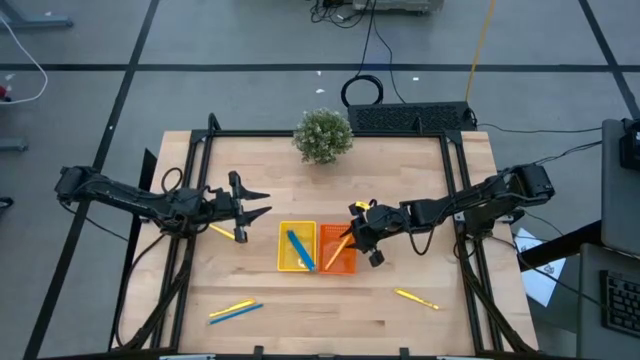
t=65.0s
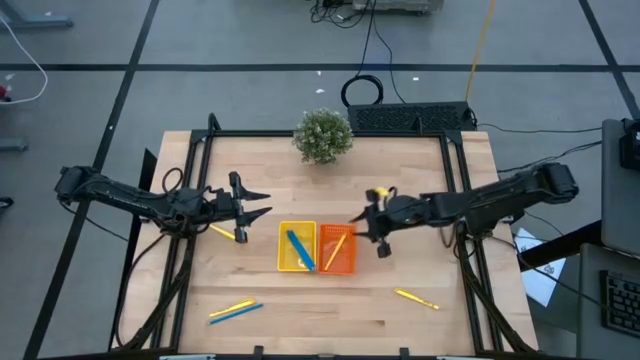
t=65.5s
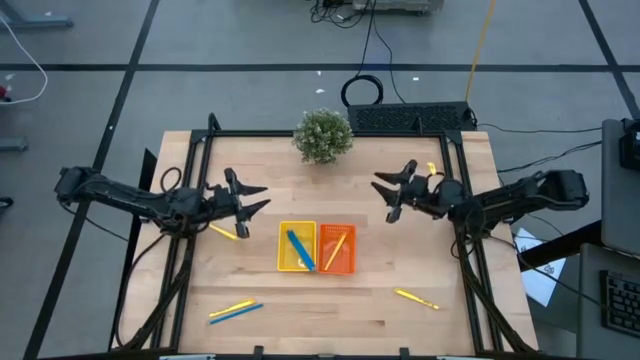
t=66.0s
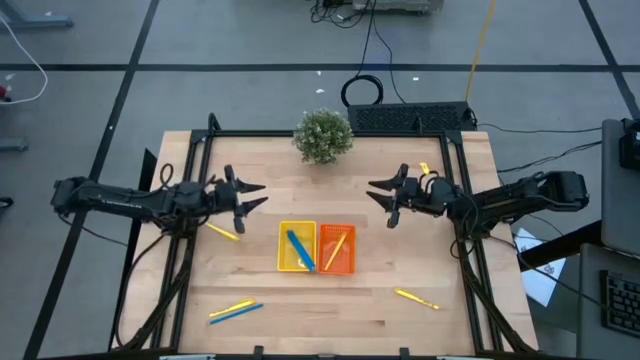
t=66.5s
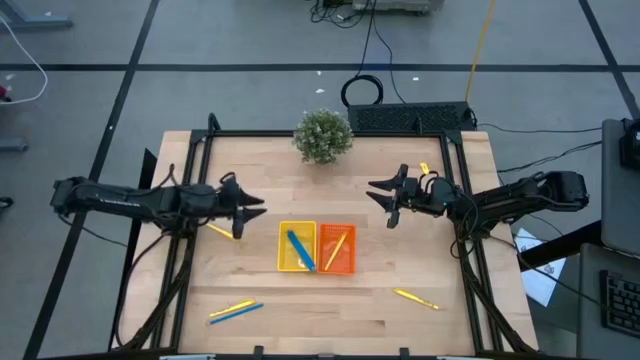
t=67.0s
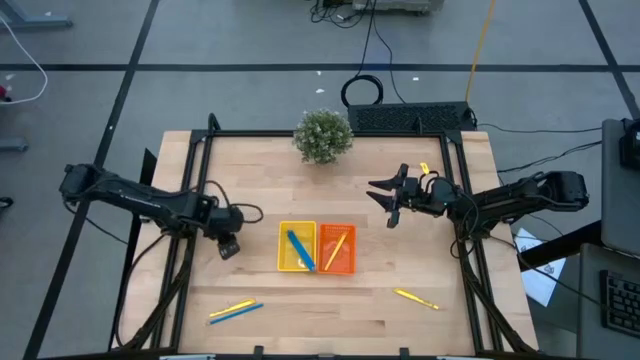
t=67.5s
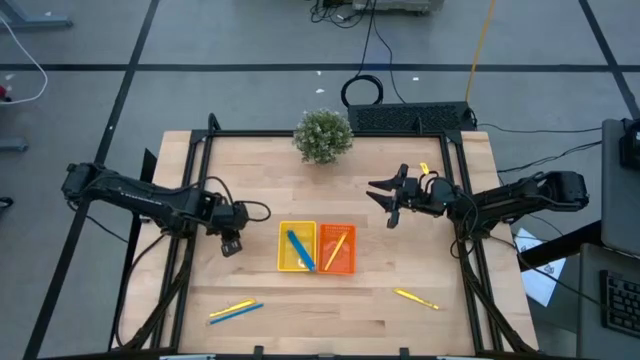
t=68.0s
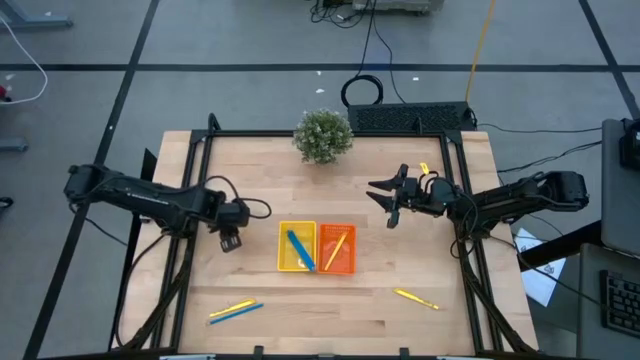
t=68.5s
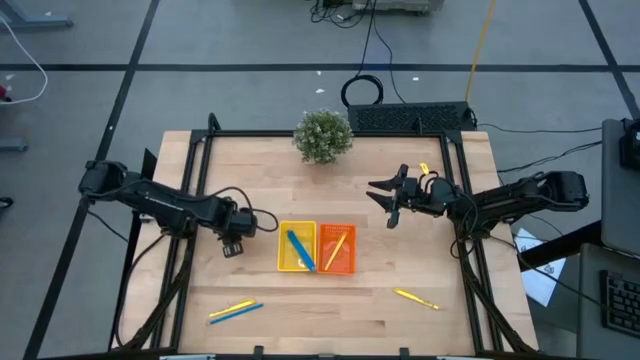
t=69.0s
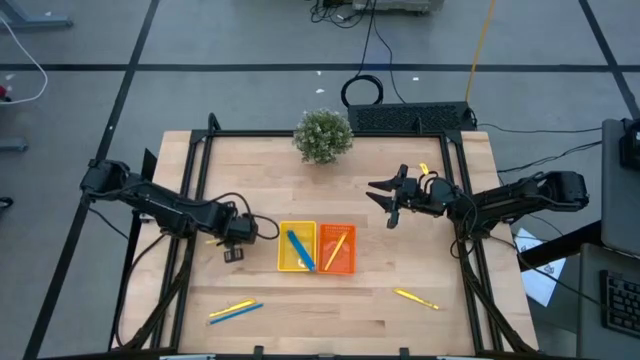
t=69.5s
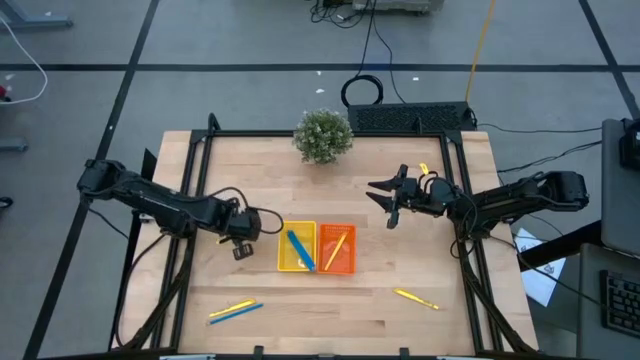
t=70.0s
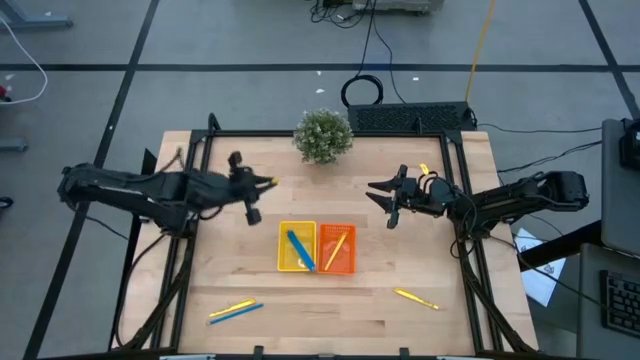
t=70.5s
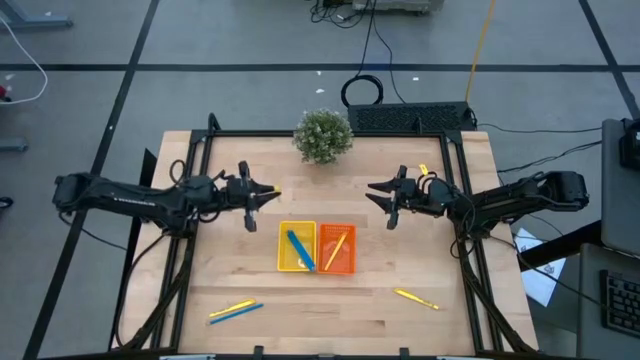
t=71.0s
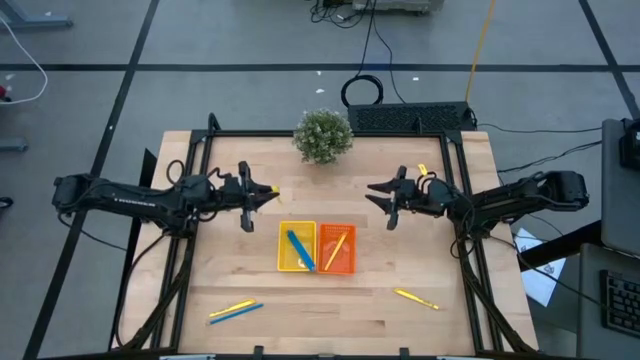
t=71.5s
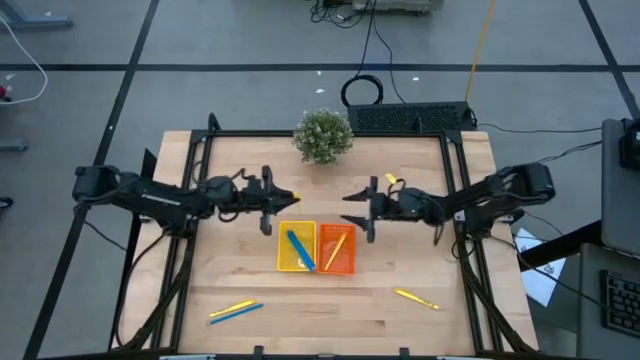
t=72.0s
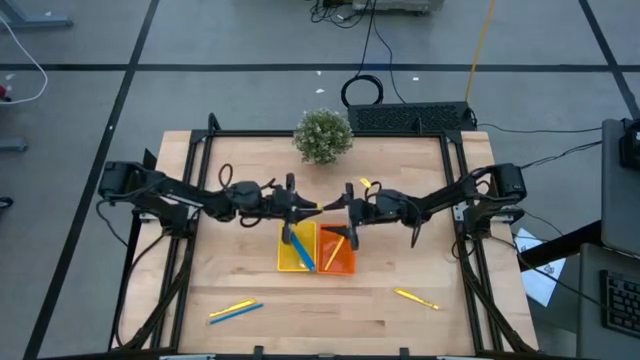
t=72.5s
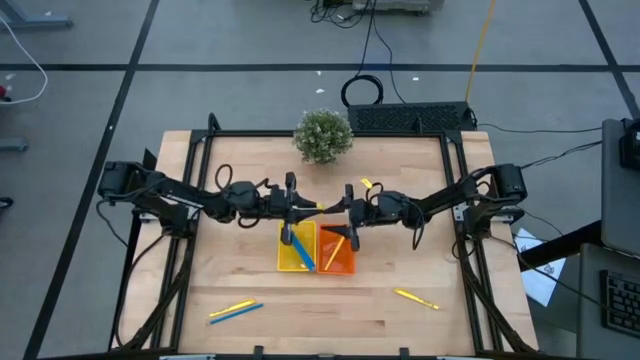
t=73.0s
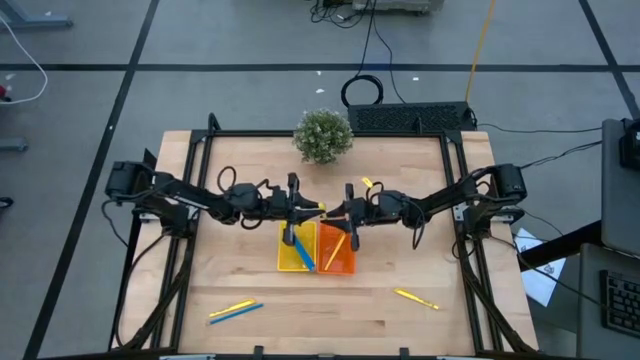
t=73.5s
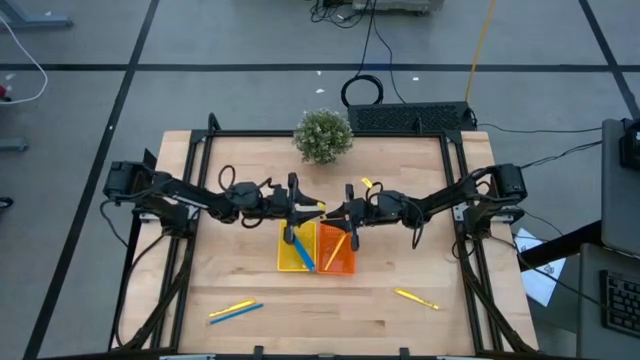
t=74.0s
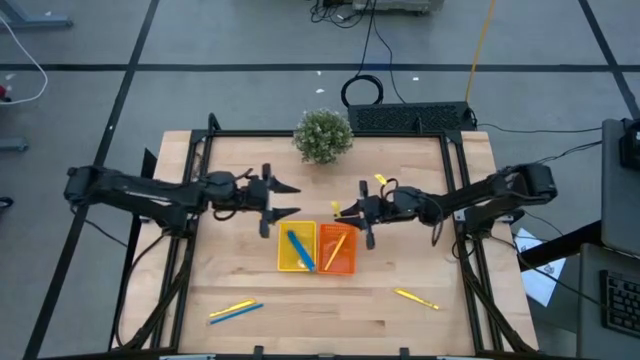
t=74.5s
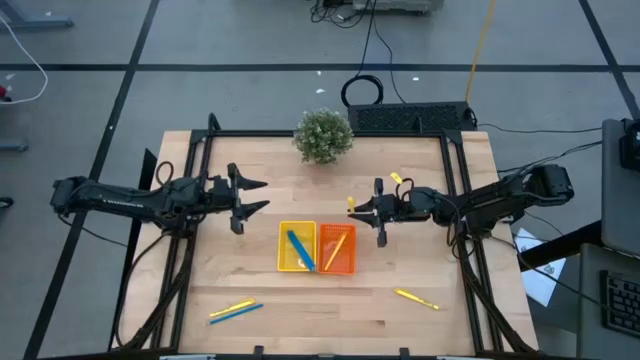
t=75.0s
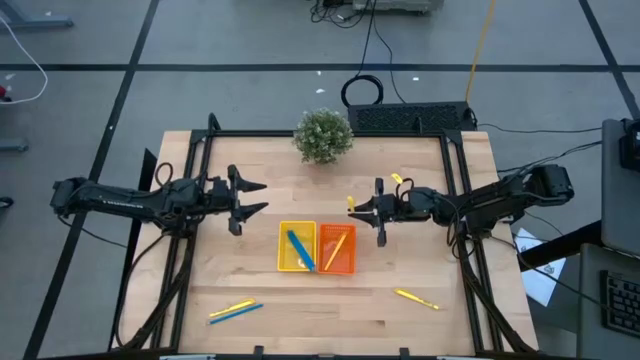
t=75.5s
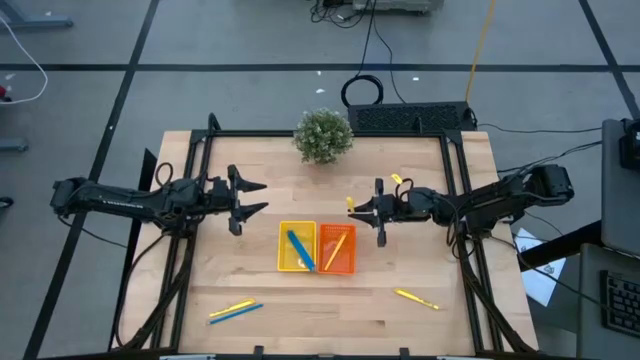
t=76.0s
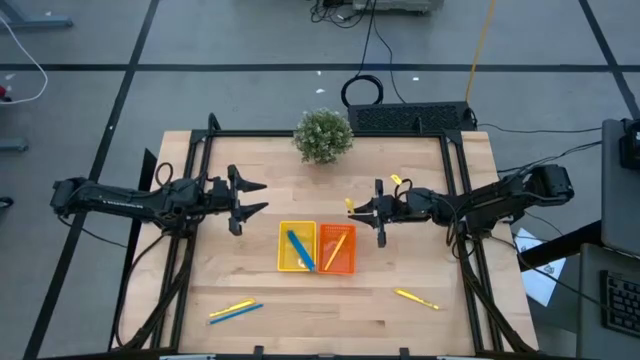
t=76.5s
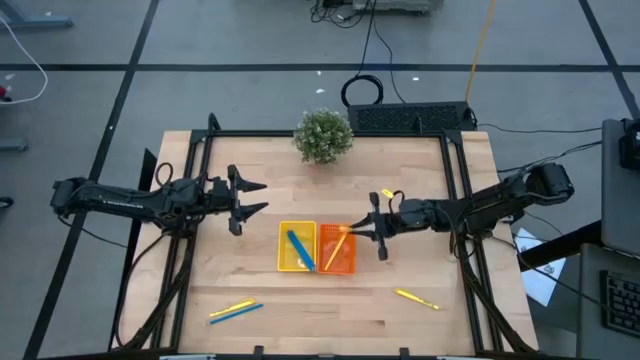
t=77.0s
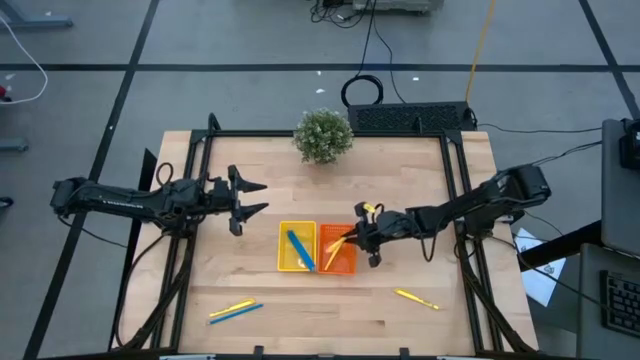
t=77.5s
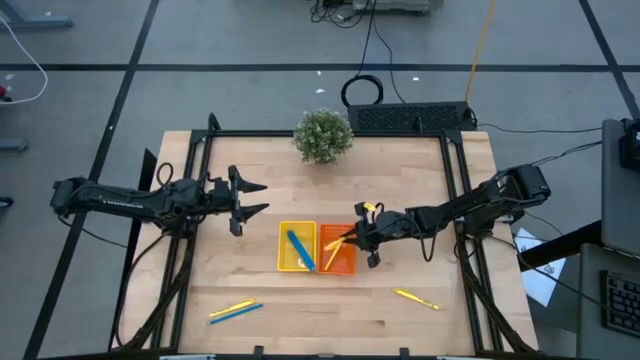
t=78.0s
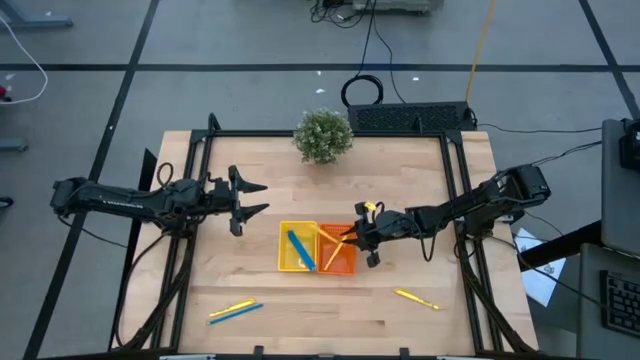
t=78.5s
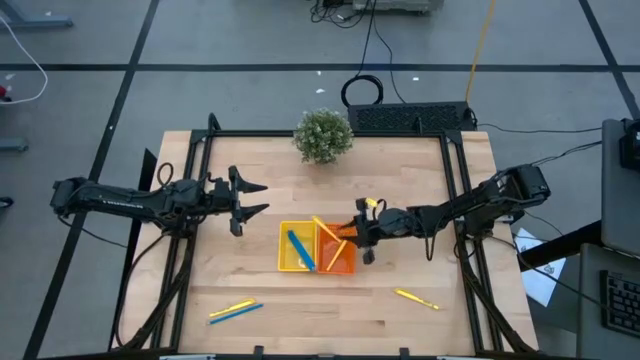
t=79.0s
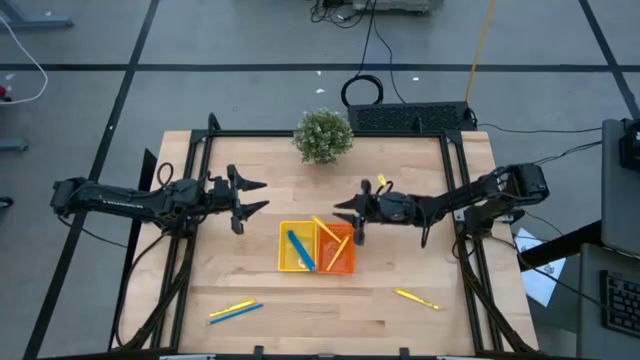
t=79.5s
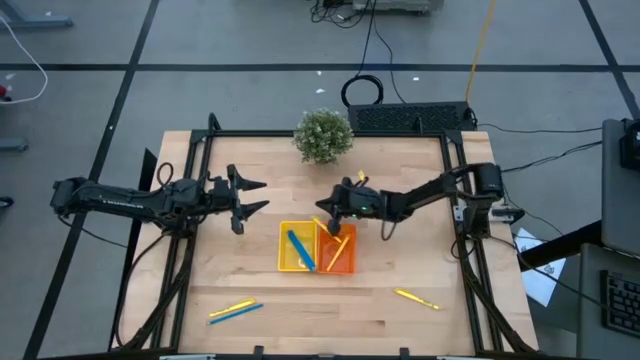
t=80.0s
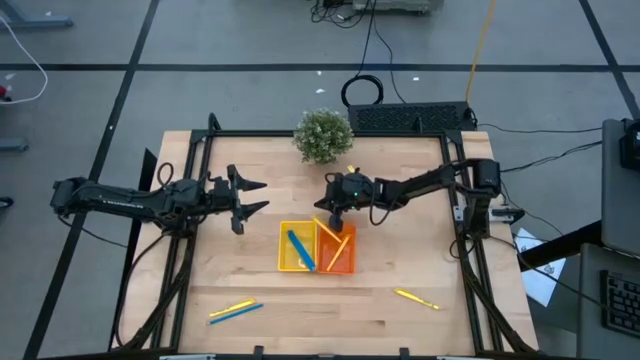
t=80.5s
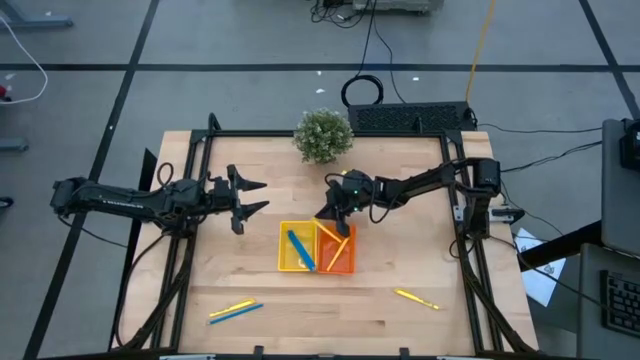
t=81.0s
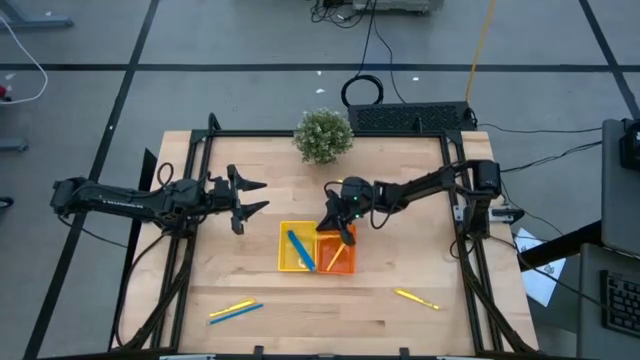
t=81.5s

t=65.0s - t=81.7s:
Task: Sort pens & pencils
Put the top yellow pen into the orange bin

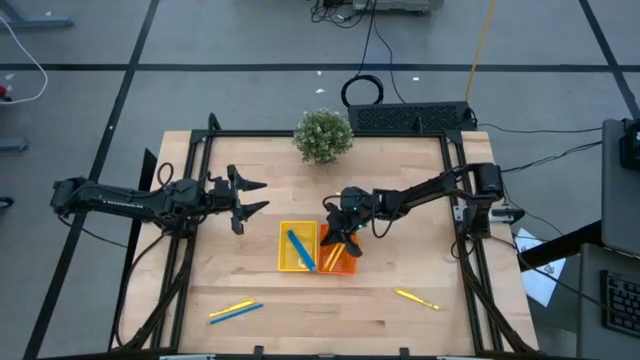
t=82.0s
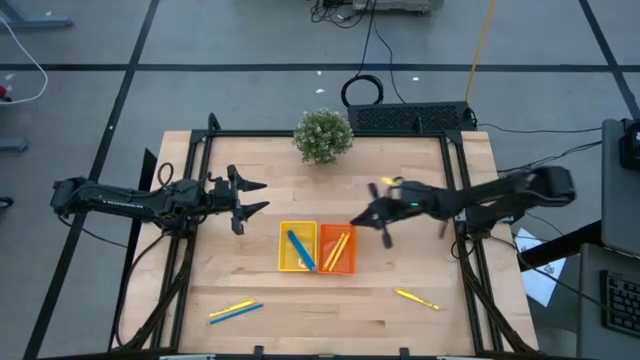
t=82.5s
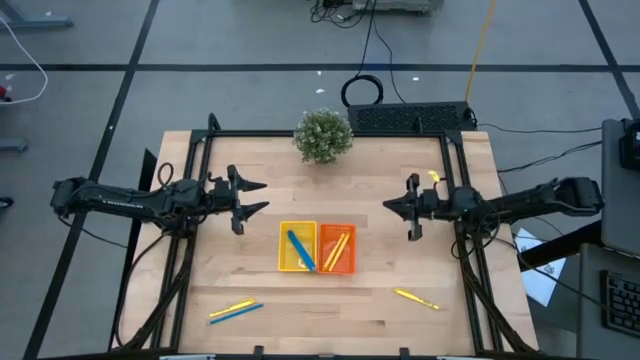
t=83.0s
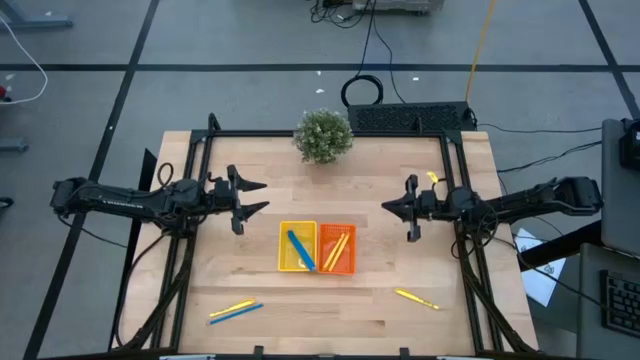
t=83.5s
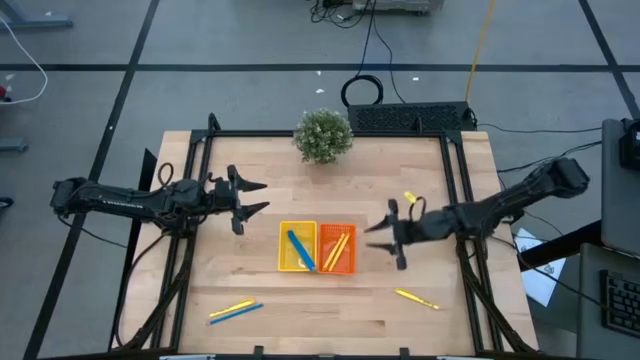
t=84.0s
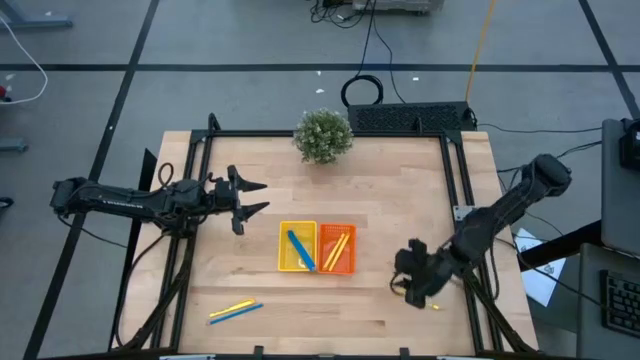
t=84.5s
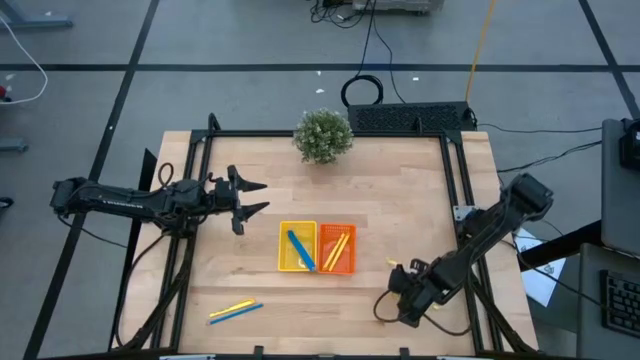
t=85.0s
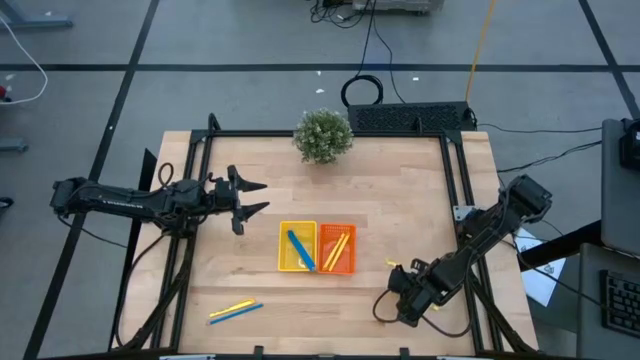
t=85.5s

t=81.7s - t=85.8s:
Put the right yellow pen into the orange bin
